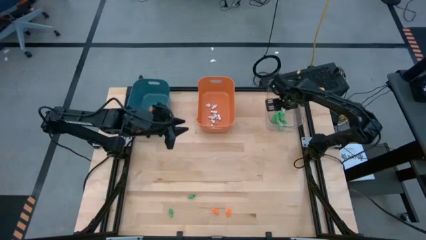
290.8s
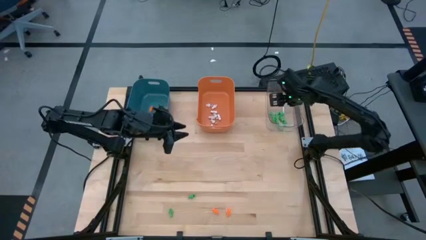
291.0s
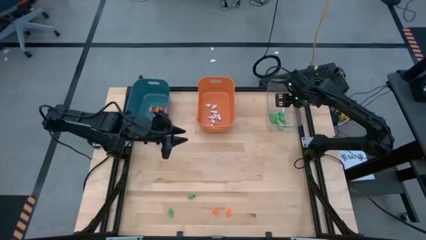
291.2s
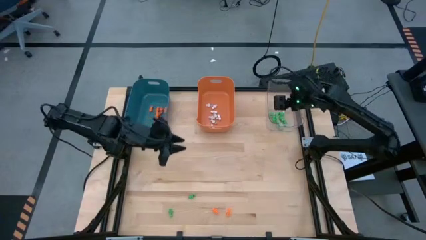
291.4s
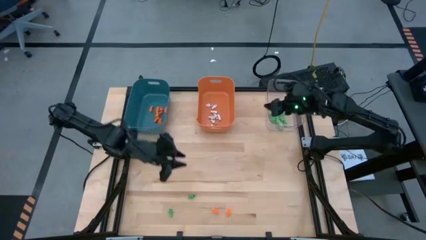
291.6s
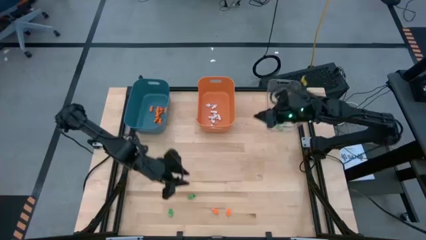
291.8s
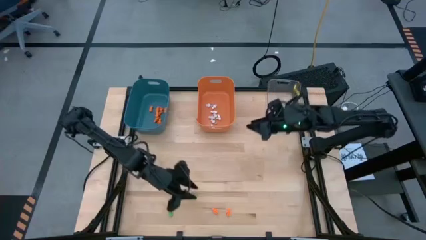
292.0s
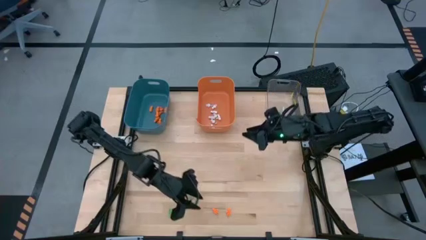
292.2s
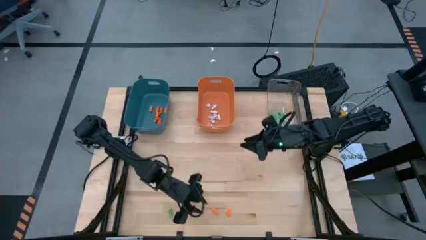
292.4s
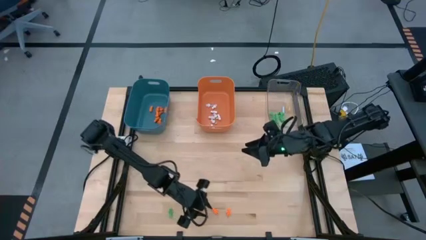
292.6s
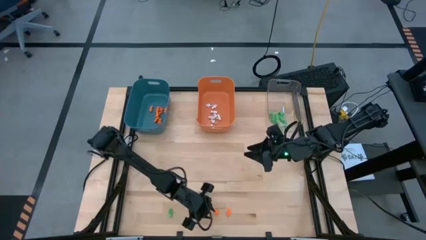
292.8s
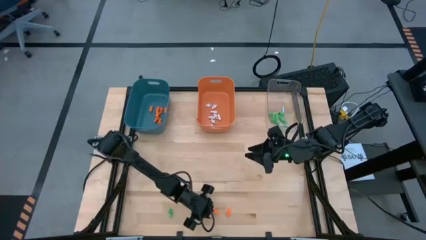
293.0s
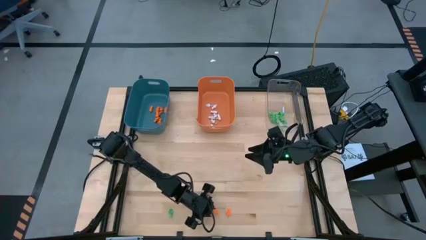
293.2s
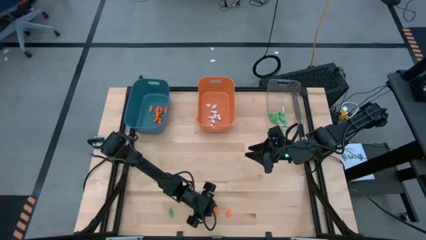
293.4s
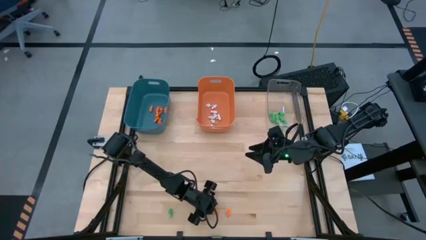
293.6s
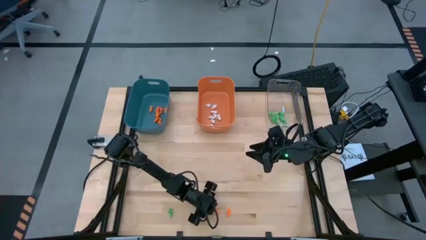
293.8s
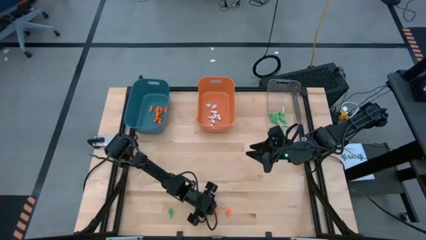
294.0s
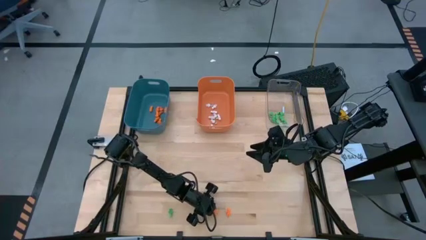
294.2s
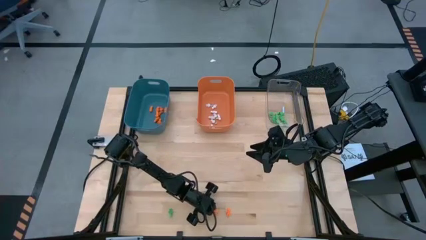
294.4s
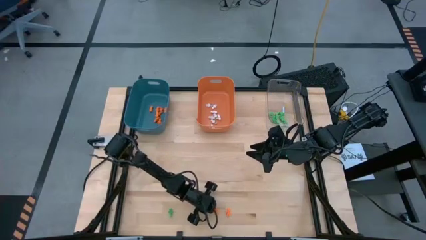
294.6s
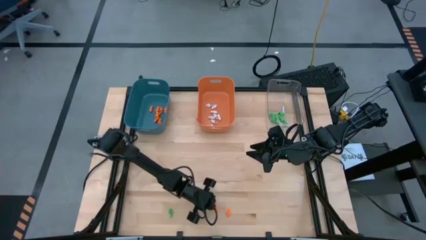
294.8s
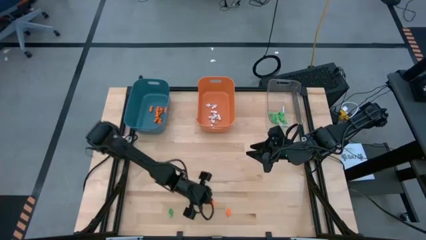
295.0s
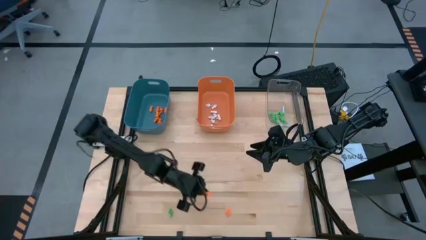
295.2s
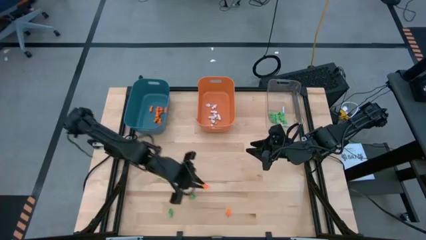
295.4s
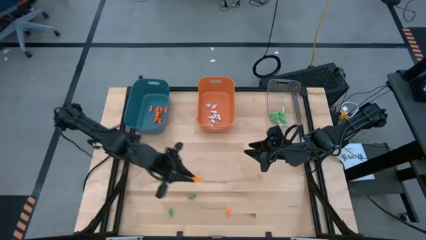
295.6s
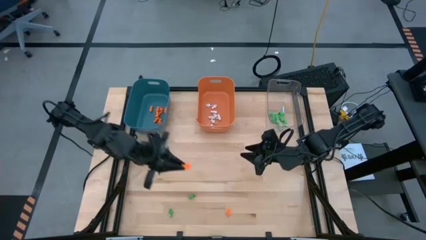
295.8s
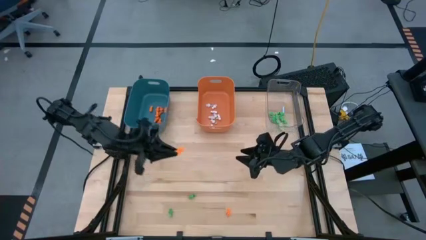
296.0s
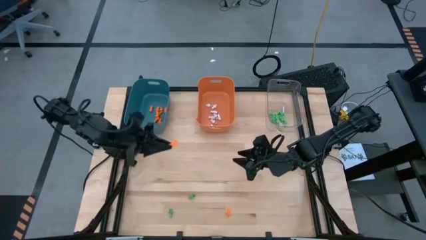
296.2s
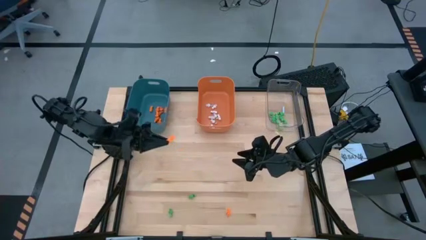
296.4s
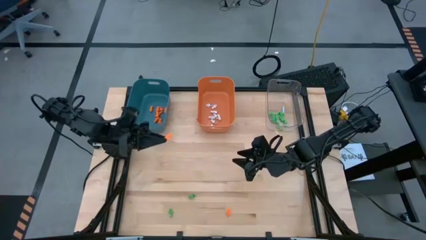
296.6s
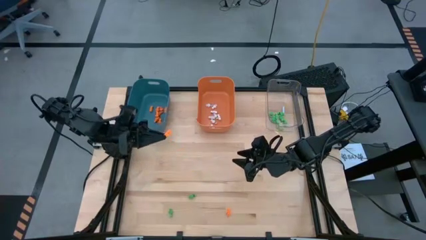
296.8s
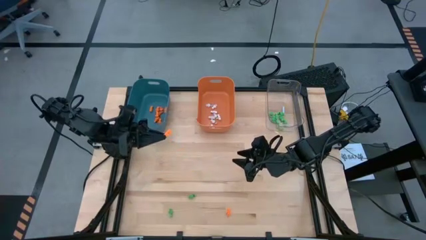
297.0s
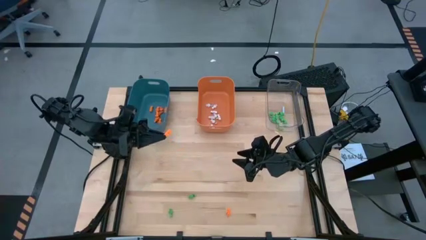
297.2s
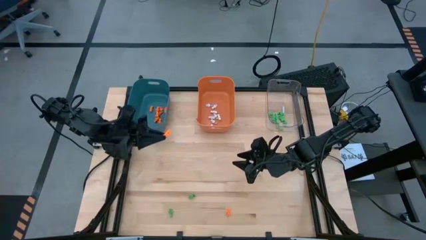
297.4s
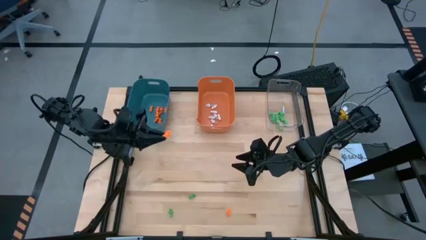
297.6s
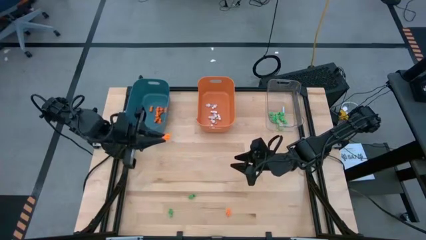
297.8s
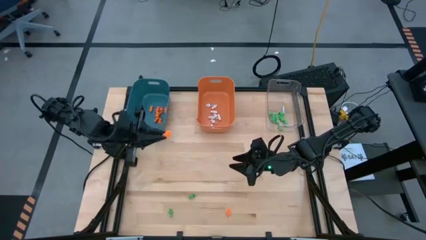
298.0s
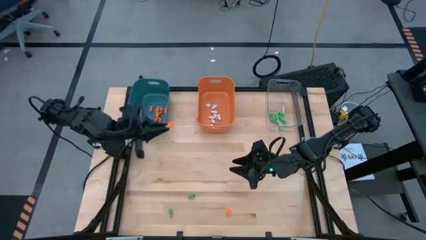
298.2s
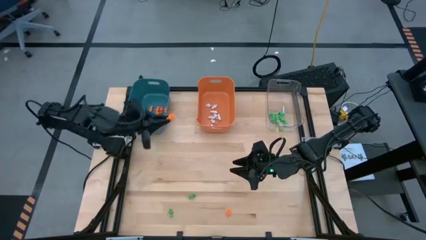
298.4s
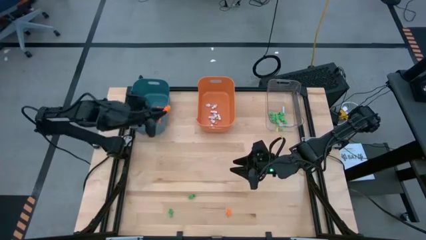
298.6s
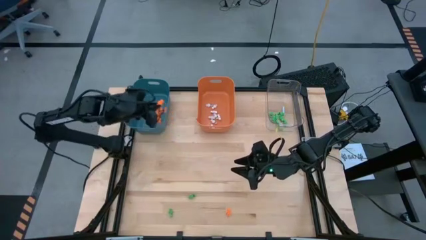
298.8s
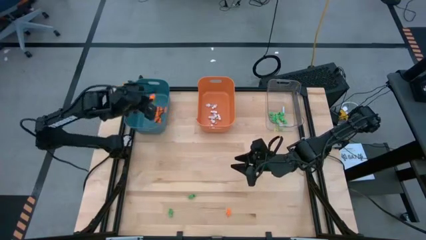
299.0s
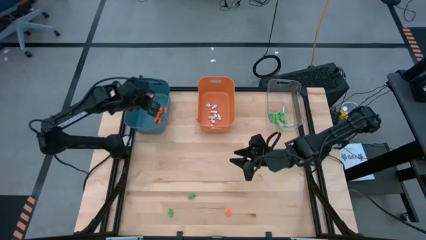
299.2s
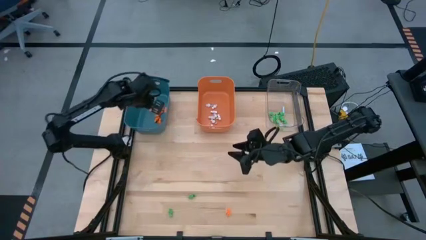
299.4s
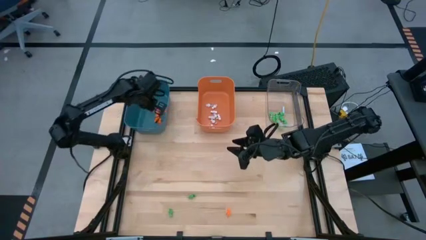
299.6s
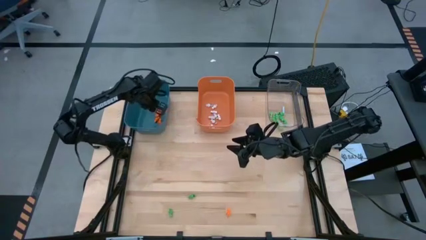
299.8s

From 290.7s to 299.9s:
Task: Sort Halloween decoration
Put the orange skeleton toy into the blue bin

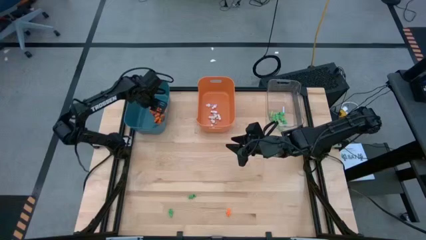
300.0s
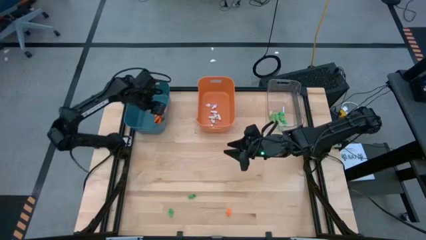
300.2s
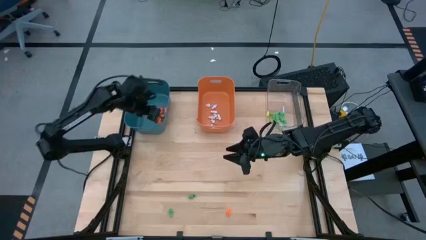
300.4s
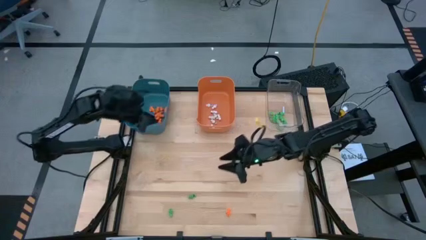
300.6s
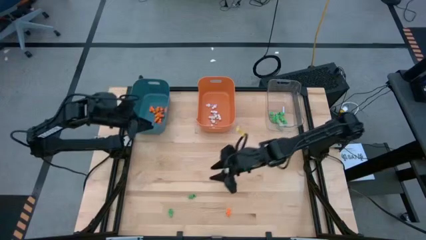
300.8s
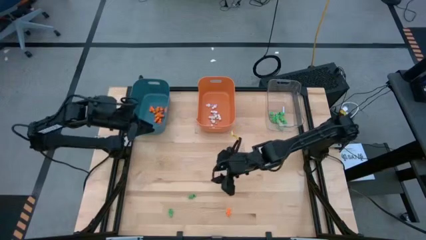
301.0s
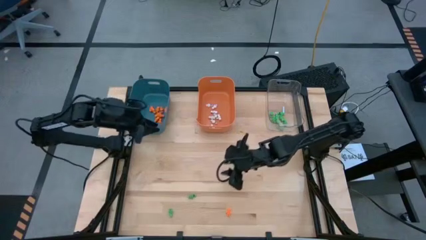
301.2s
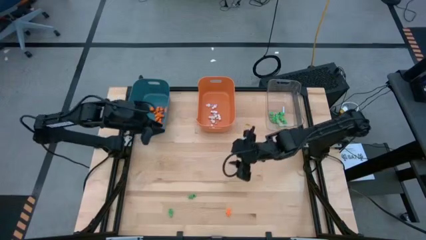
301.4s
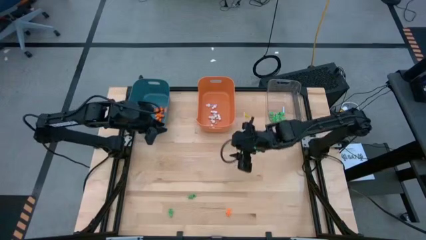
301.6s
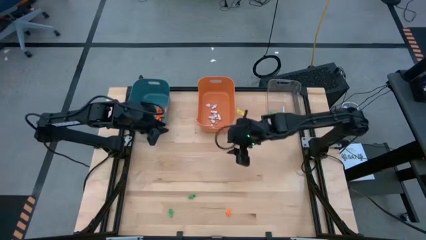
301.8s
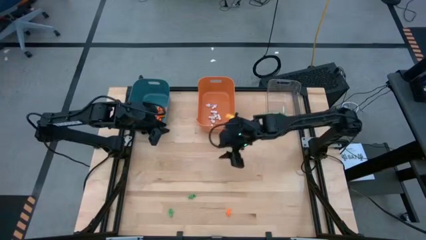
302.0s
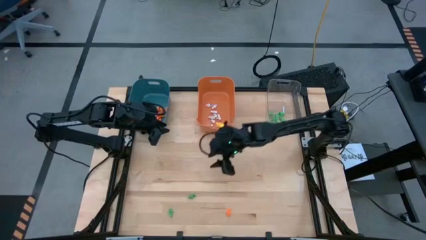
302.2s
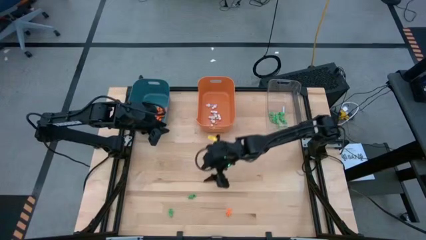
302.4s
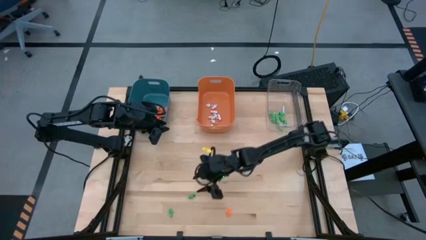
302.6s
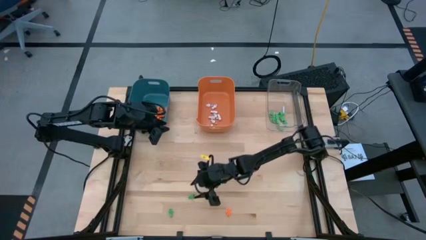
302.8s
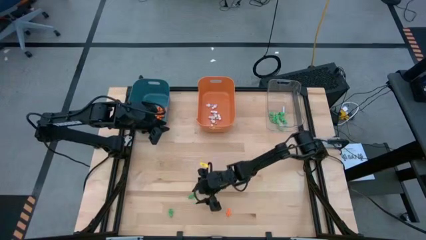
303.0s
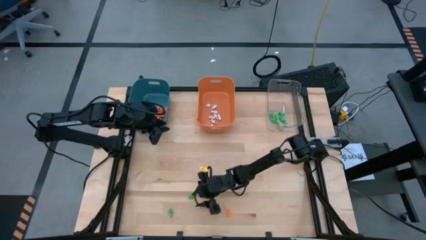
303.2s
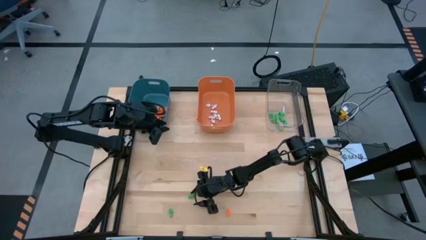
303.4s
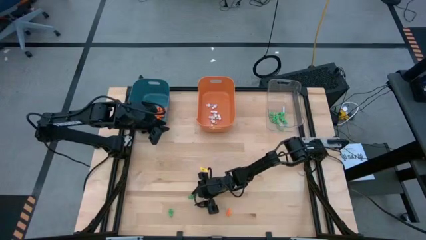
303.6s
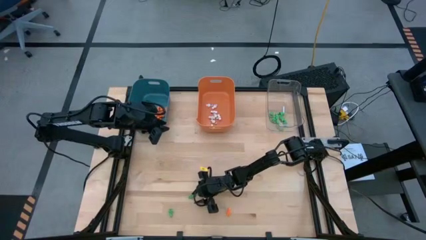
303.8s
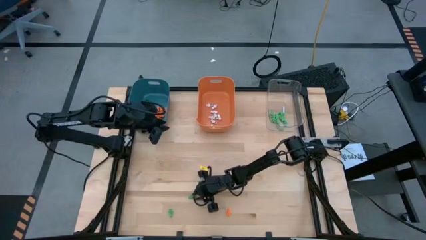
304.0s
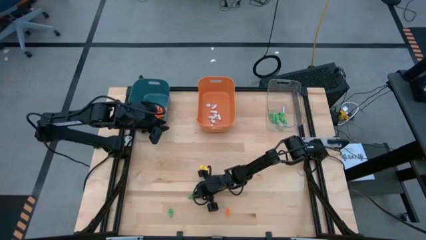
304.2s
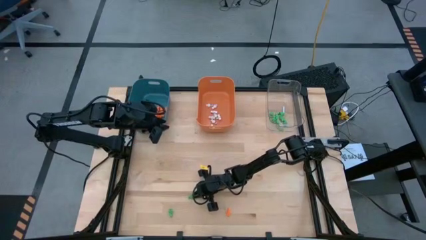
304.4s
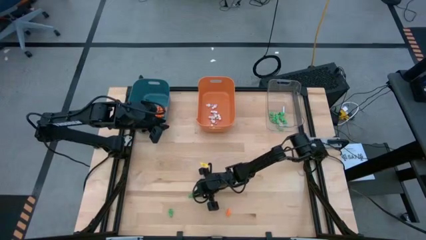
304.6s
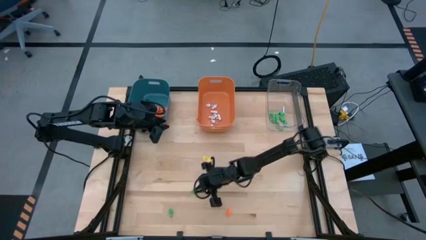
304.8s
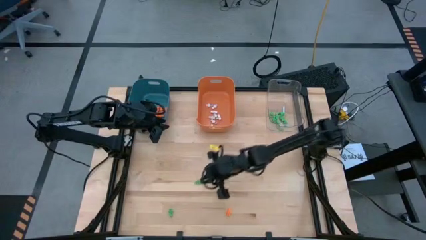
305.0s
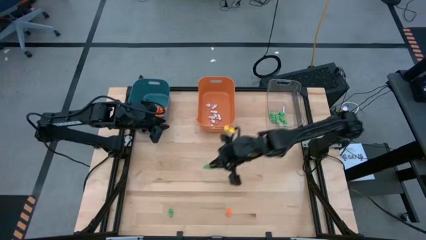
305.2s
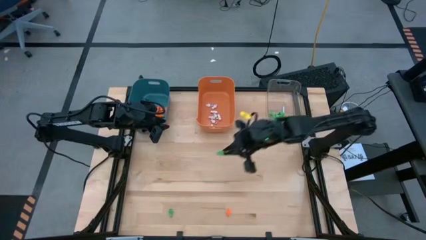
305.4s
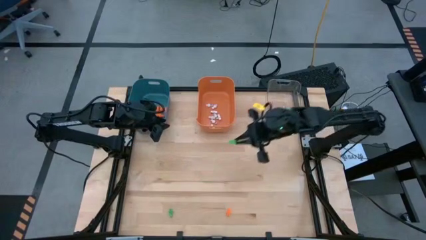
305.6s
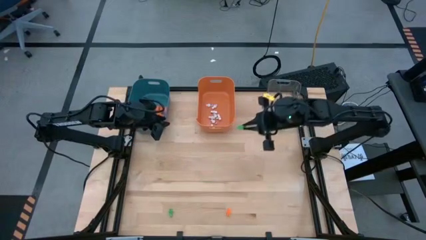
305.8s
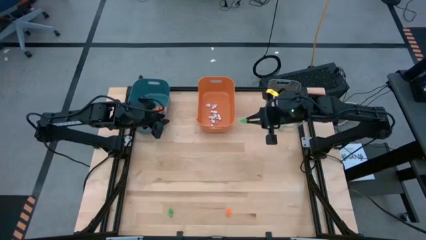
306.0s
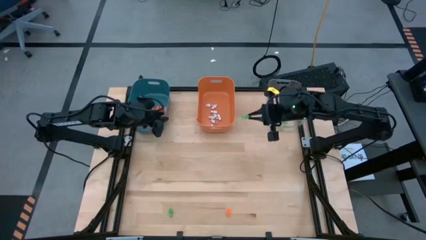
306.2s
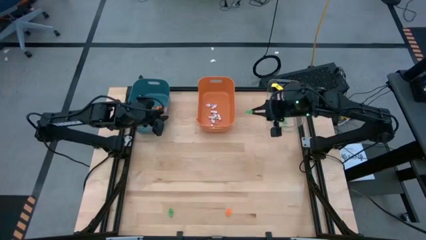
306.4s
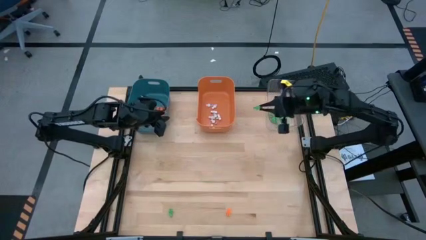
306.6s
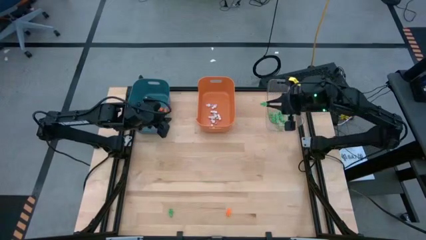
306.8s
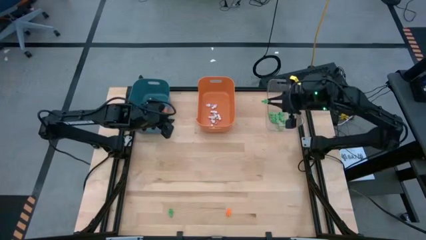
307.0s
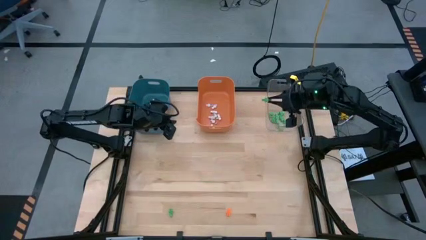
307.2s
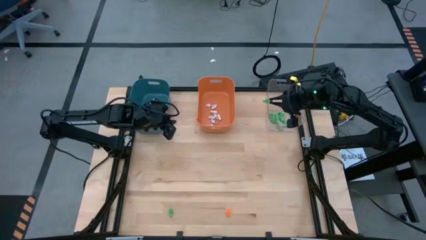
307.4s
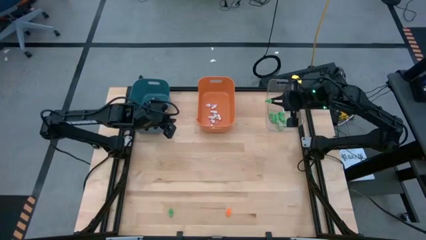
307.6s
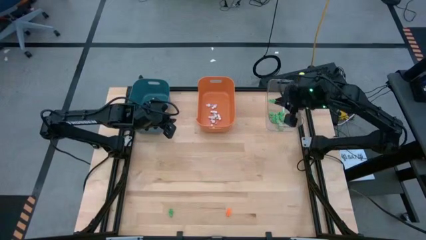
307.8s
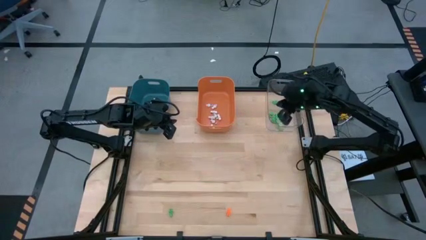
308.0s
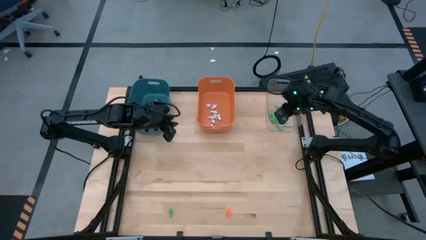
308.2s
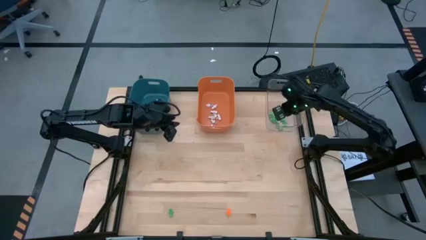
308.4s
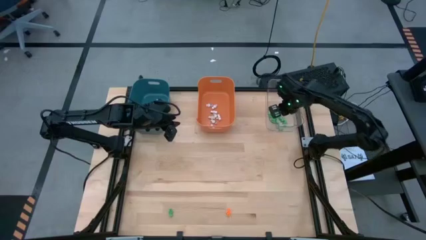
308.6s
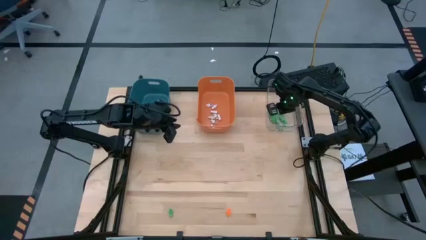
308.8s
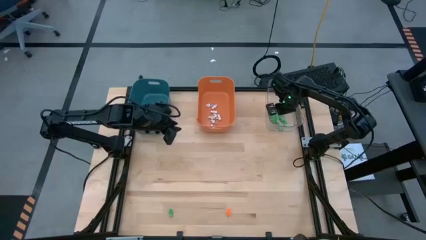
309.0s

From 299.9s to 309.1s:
Put the green skeleton toy into the transparent bin
